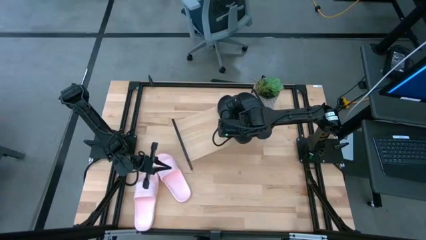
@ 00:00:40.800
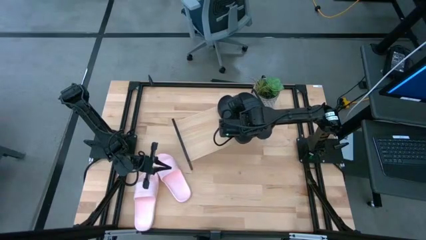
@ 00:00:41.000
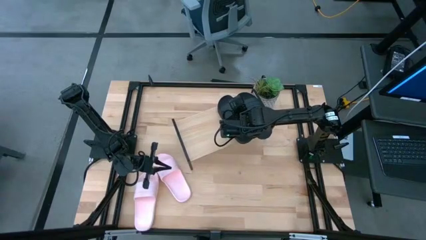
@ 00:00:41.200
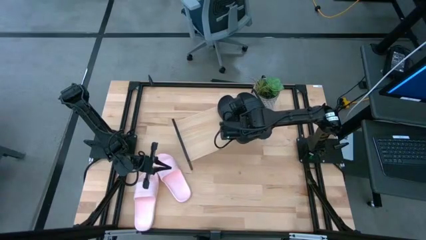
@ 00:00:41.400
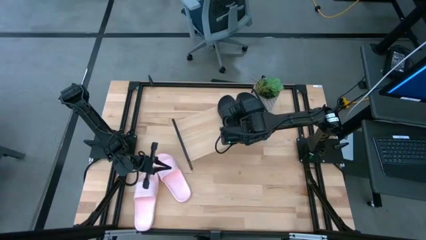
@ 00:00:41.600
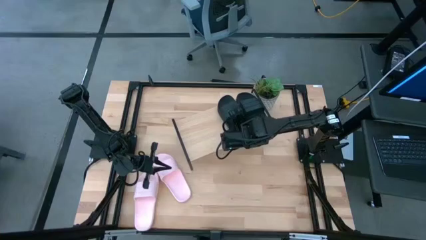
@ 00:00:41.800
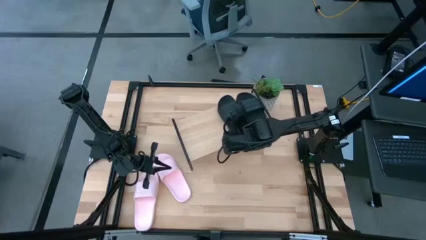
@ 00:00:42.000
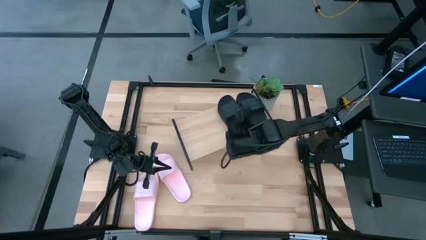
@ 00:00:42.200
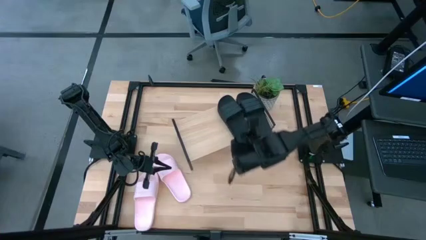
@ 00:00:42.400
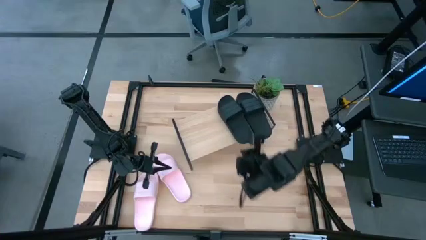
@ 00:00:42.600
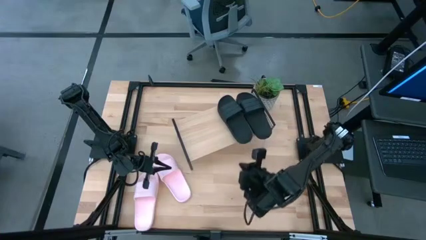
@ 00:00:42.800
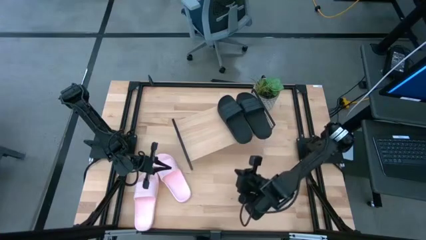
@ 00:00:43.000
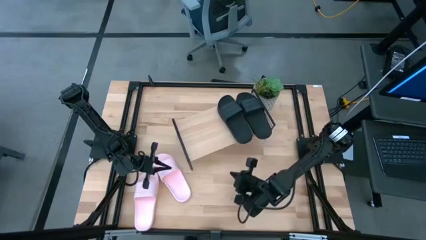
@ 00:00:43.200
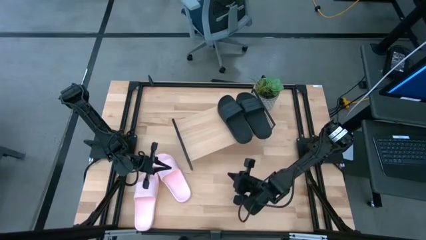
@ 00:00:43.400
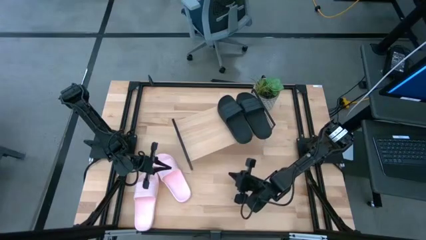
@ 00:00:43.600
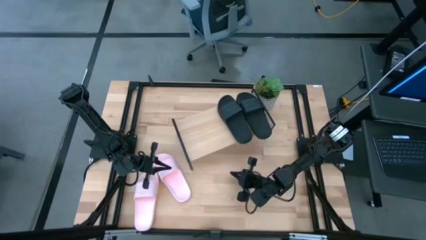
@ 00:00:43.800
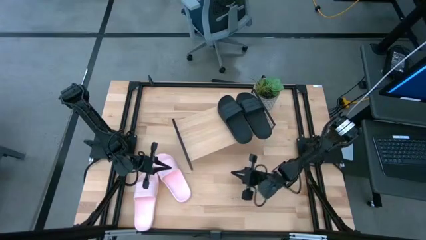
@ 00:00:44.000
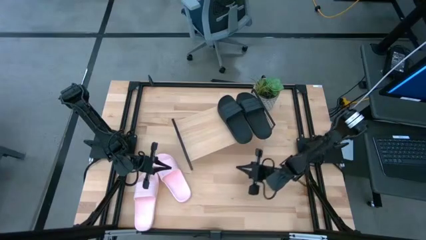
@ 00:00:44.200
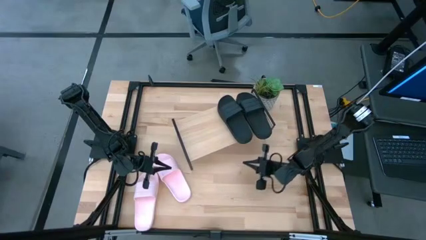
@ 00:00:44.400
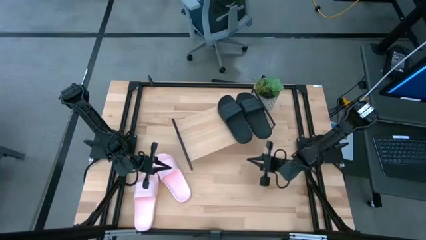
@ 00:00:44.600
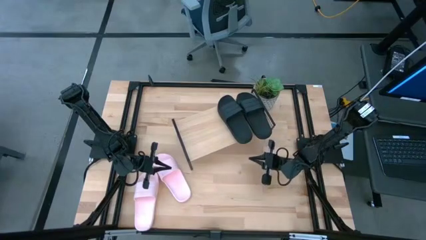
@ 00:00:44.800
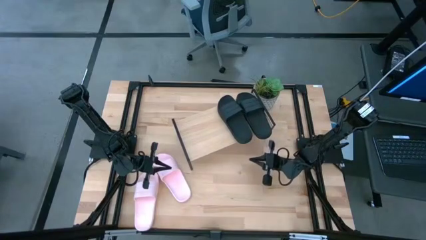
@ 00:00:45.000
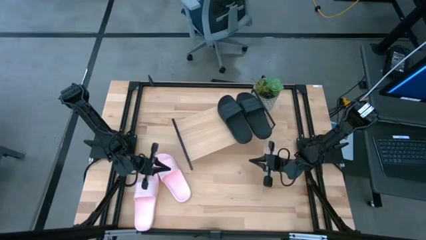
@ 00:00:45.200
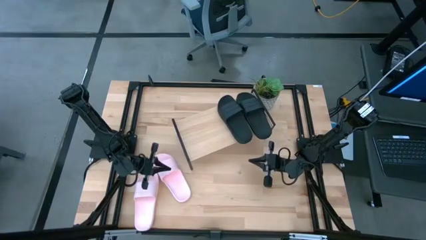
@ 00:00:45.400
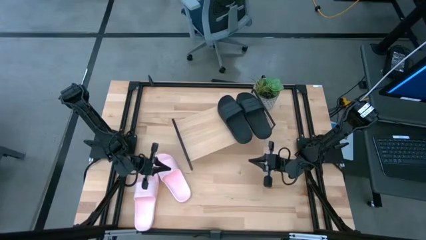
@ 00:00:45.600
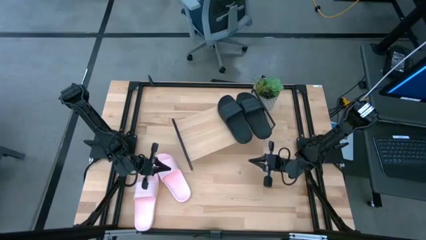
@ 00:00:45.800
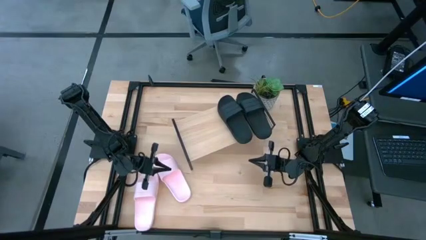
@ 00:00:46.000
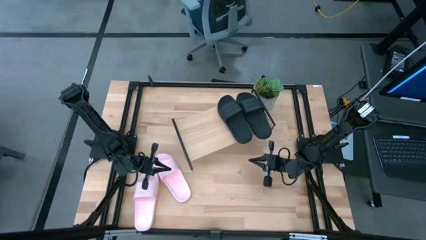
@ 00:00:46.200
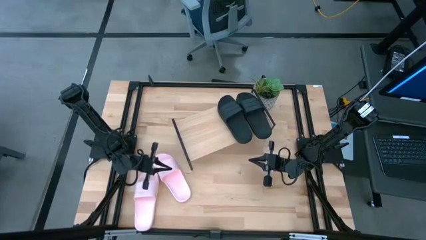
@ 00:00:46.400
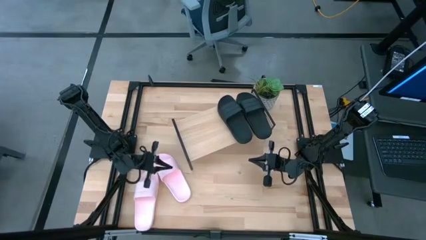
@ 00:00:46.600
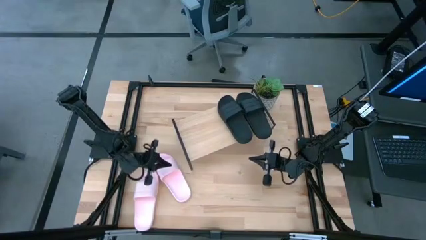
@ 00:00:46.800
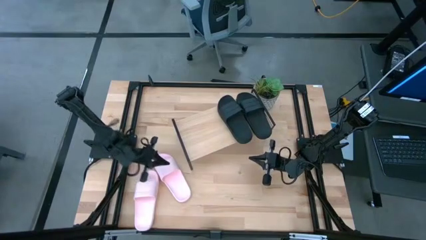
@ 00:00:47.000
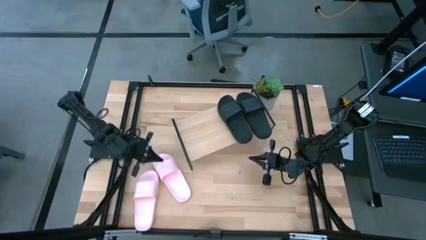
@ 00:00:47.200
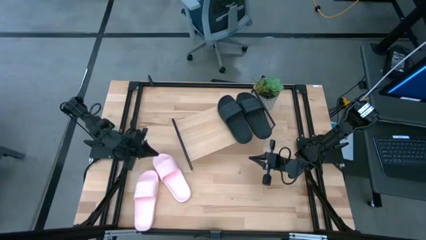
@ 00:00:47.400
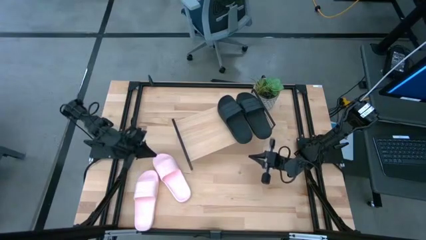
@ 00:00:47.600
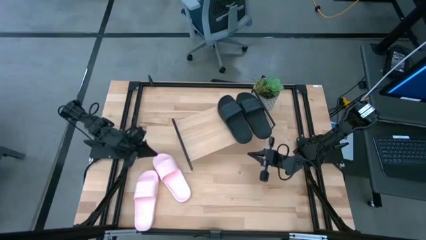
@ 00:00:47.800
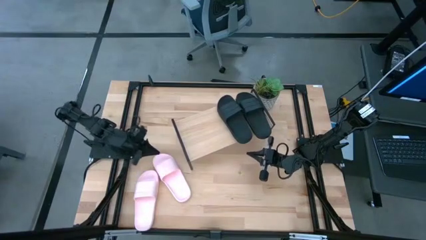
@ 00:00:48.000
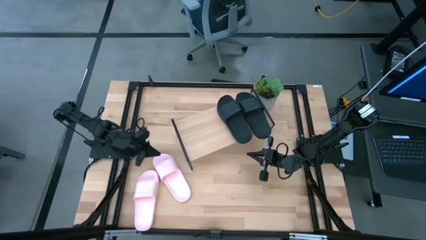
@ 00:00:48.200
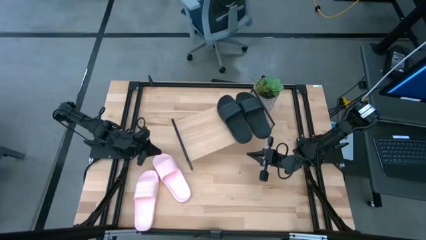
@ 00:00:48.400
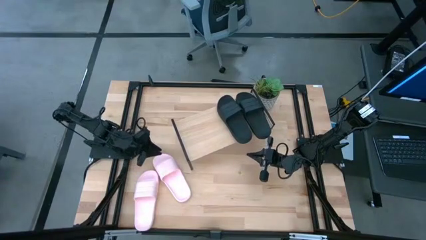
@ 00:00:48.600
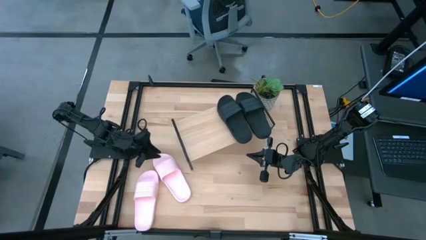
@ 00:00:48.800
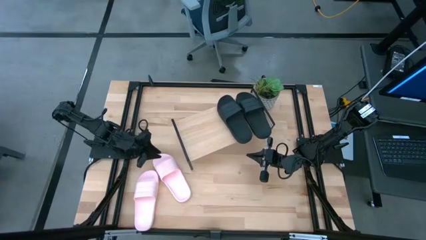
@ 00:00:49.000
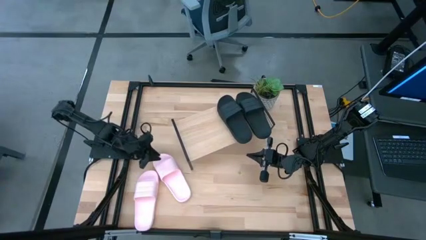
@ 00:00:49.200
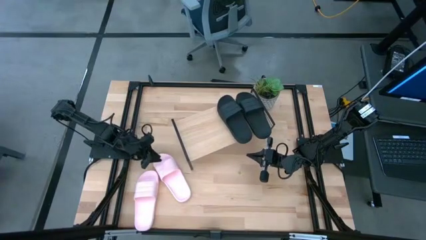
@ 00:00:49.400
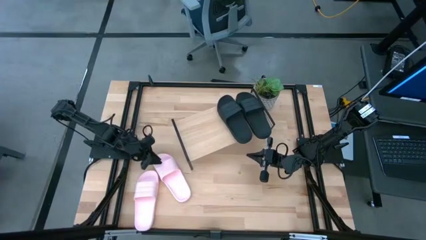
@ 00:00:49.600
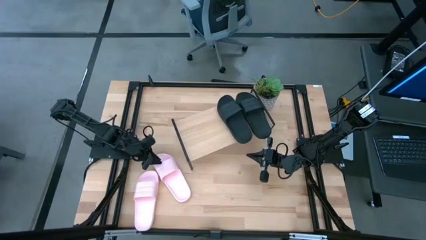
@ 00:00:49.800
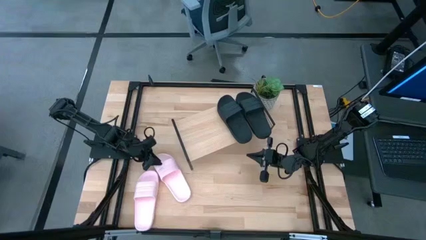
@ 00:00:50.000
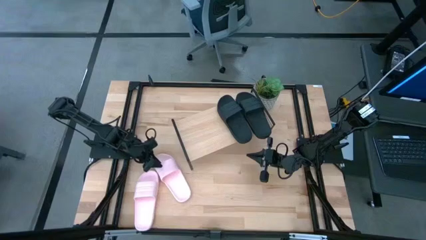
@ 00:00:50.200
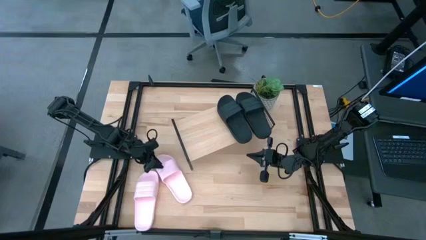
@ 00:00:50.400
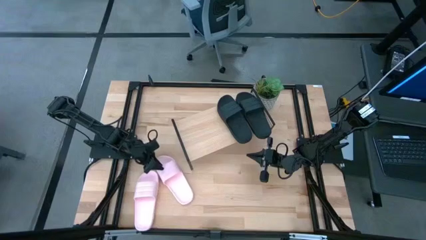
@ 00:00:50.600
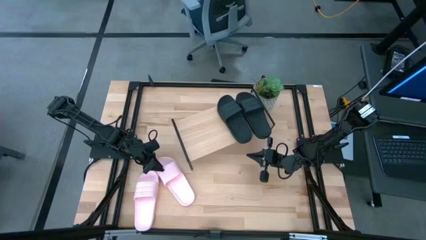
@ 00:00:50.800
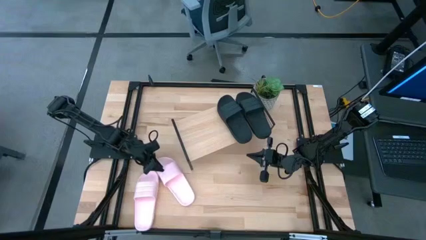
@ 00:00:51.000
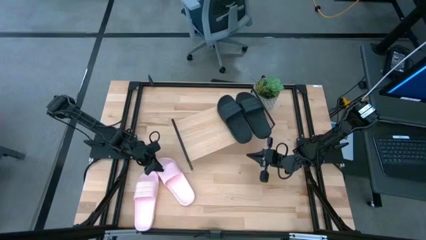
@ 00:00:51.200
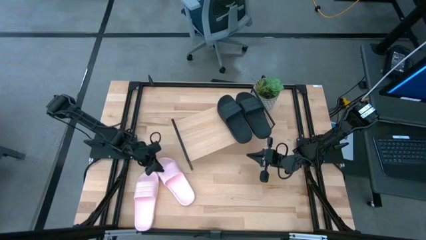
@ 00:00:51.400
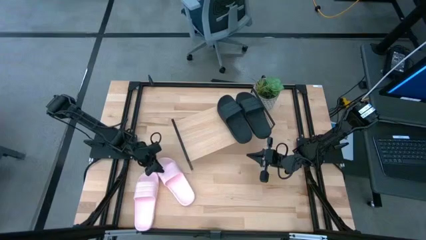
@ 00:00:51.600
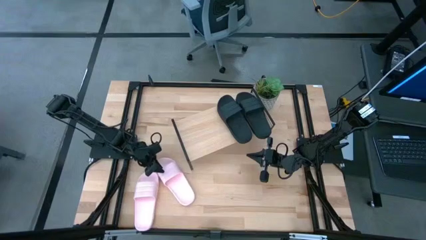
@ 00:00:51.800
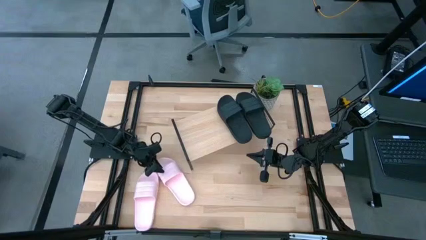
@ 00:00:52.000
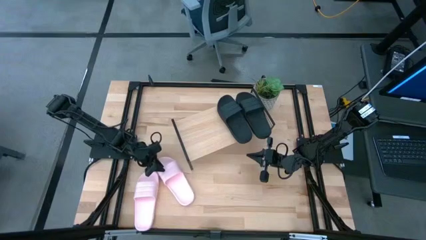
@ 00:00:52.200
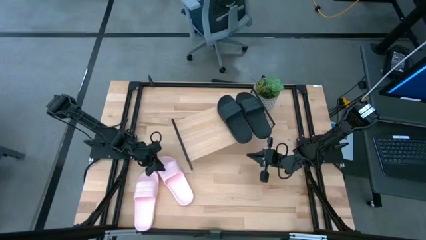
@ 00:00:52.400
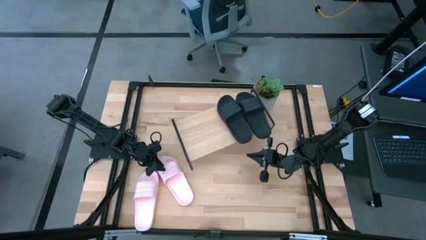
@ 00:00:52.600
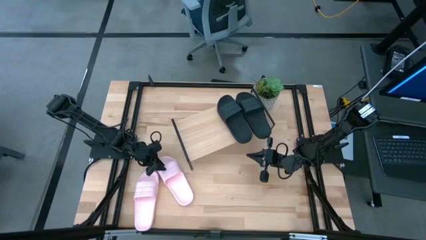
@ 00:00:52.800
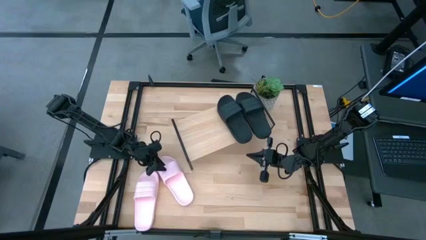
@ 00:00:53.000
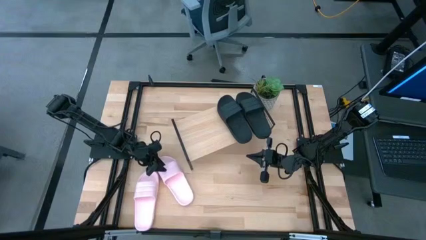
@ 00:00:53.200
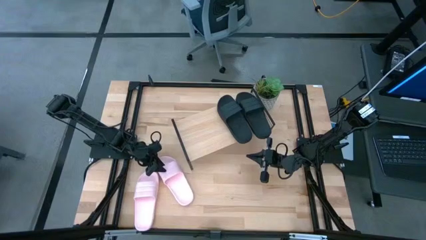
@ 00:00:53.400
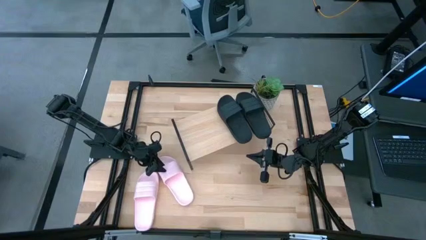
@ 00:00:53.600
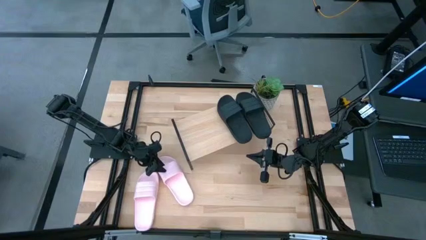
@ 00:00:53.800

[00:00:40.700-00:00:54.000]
Task: Pick and place slides into the shelf
Put the right pink slide on the shelf

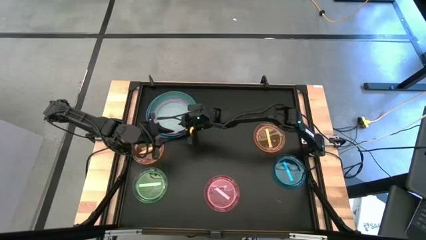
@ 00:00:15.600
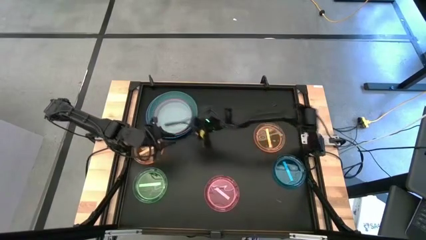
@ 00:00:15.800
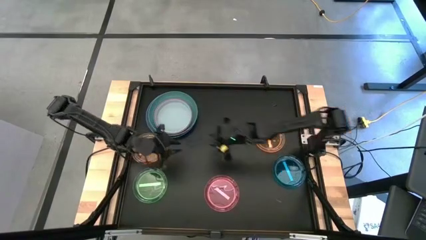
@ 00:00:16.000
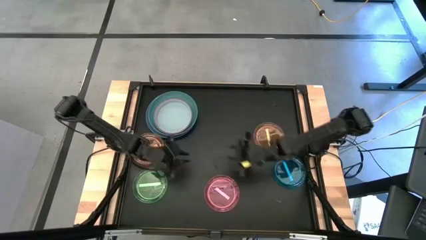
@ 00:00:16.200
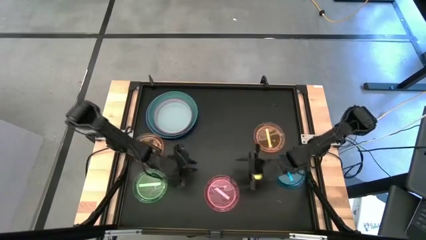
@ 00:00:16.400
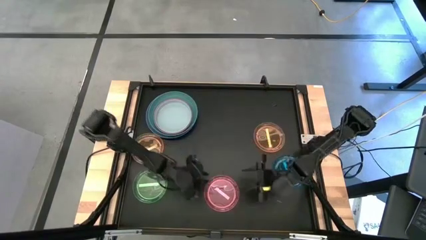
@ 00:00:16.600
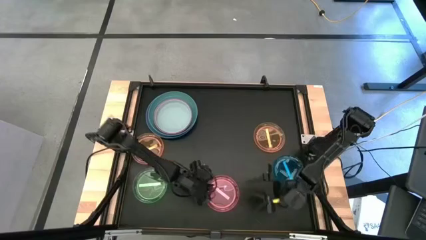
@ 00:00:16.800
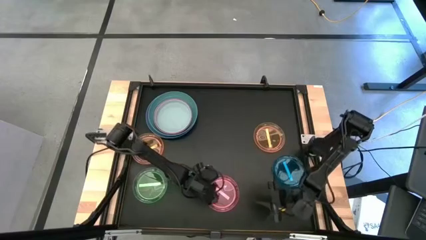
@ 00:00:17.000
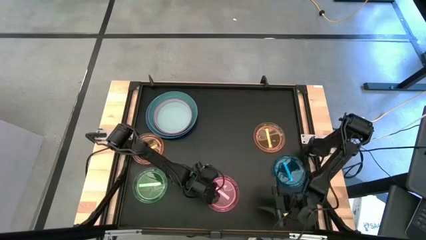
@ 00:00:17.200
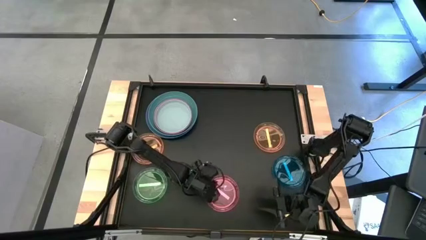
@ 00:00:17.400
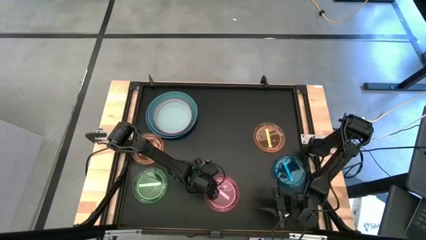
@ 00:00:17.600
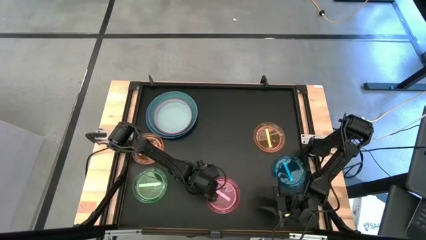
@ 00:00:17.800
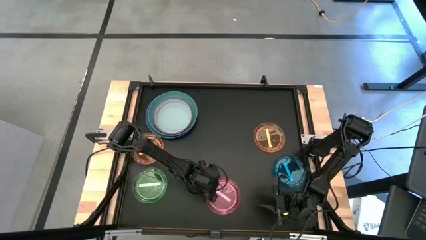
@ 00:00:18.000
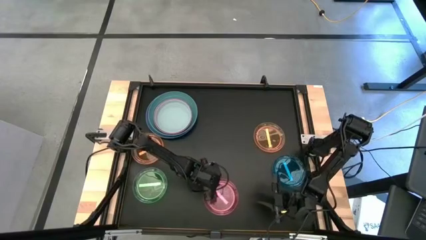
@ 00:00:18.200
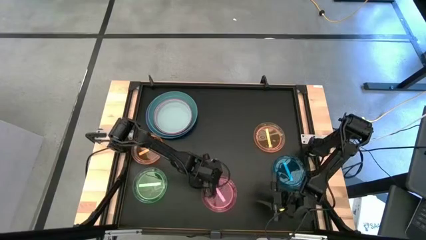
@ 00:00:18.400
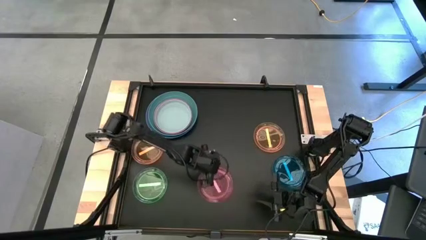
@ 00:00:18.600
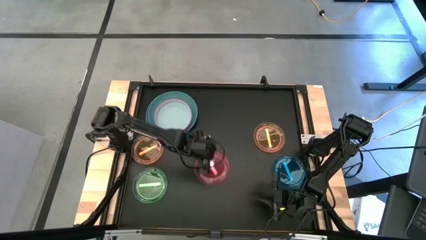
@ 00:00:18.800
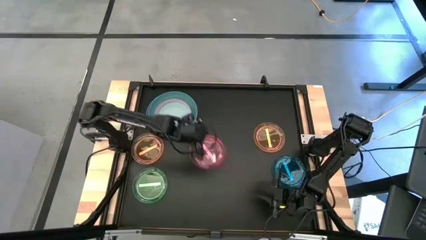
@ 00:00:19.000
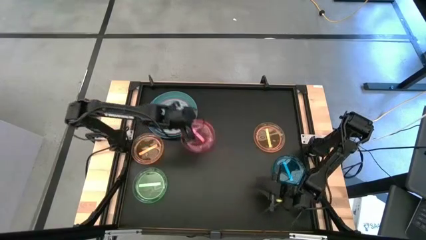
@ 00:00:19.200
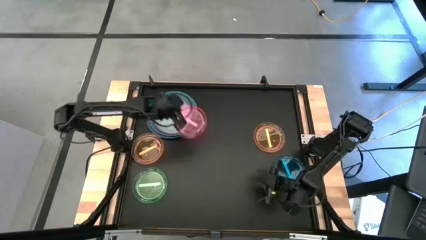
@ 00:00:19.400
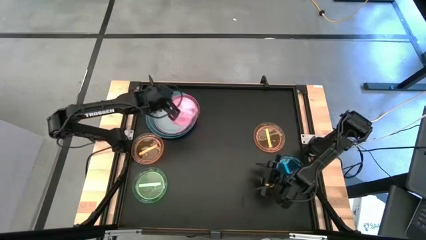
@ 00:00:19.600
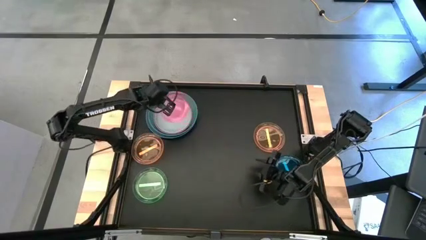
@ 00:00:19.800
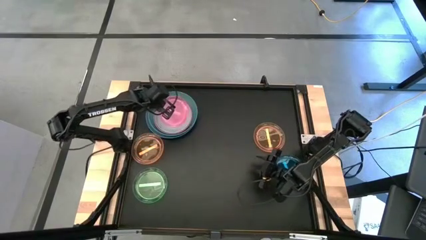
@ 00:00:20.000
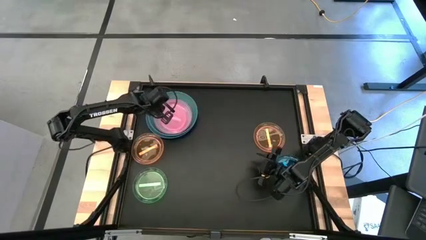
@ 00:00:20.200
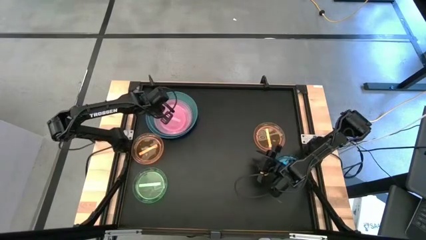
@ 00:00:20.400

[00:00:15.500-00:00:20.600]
Task: Stack plastic plates
Stack the light pink plate on the gray plate
